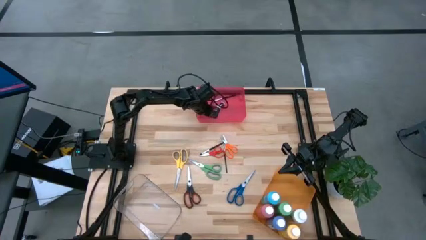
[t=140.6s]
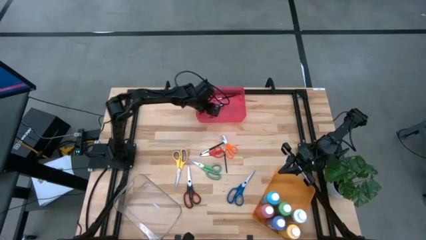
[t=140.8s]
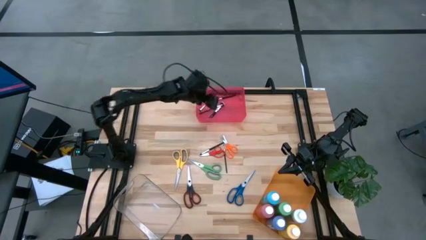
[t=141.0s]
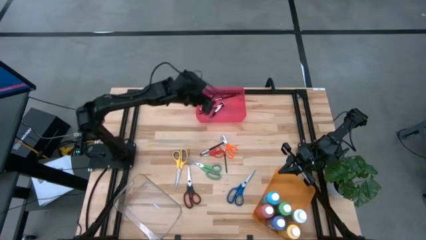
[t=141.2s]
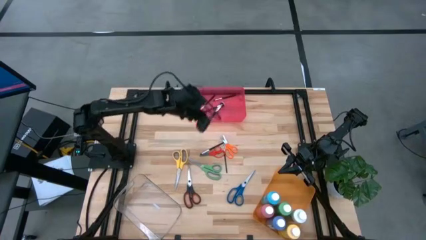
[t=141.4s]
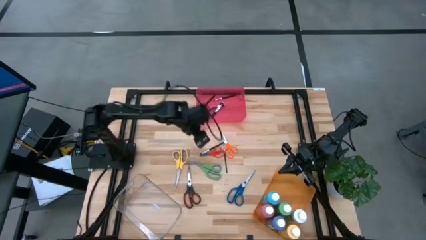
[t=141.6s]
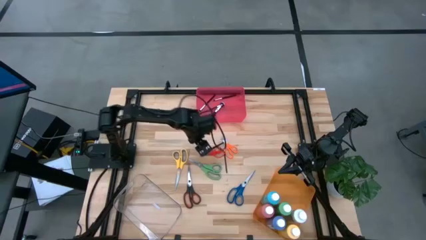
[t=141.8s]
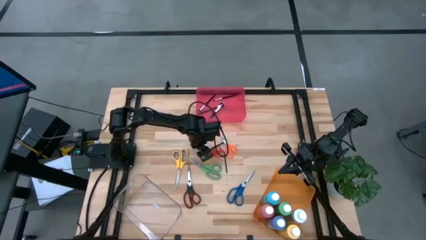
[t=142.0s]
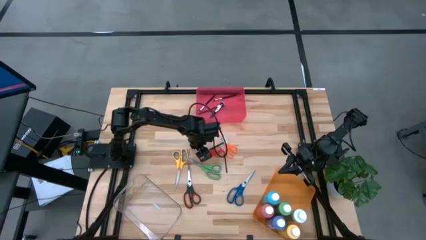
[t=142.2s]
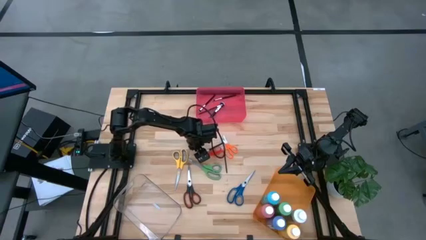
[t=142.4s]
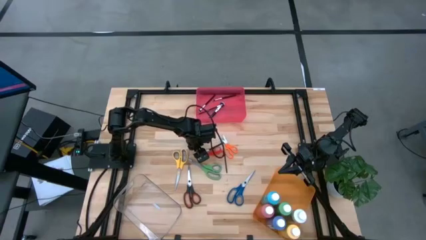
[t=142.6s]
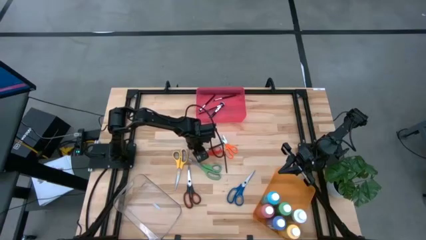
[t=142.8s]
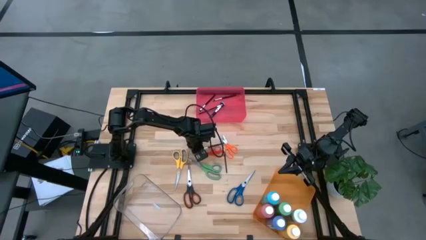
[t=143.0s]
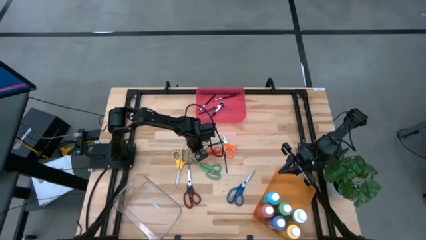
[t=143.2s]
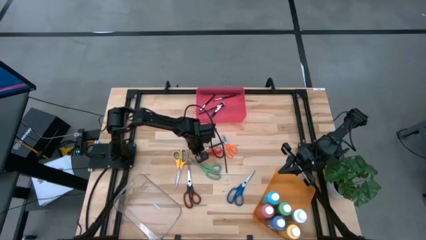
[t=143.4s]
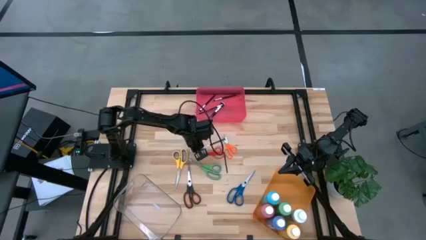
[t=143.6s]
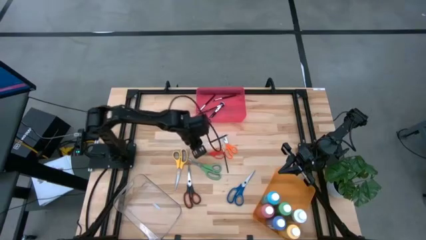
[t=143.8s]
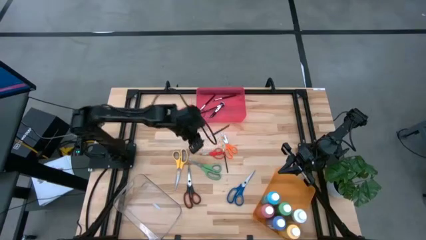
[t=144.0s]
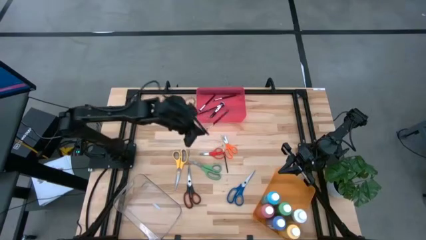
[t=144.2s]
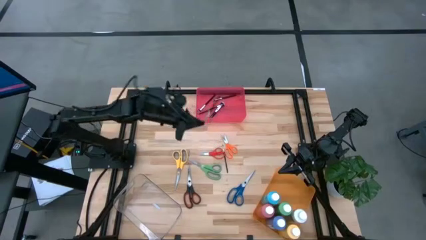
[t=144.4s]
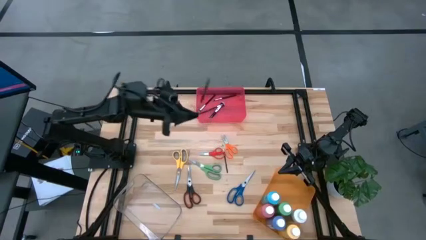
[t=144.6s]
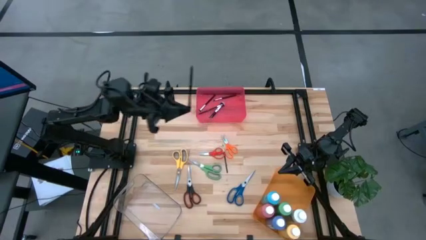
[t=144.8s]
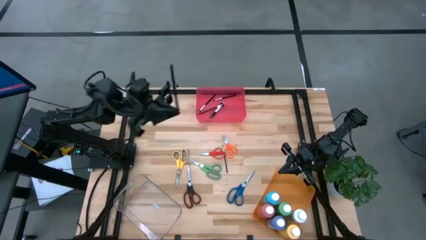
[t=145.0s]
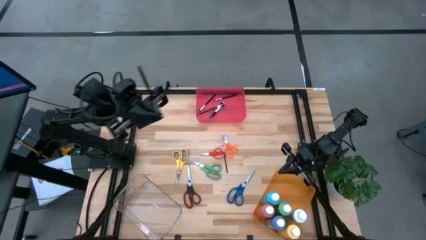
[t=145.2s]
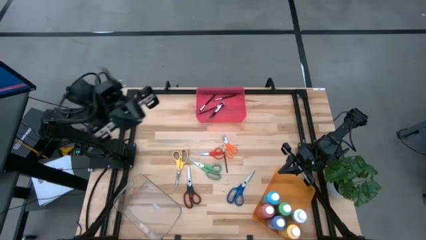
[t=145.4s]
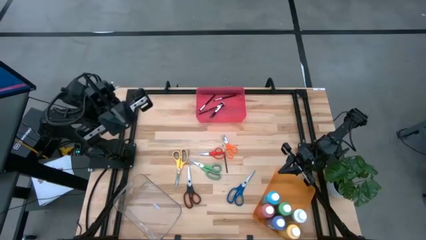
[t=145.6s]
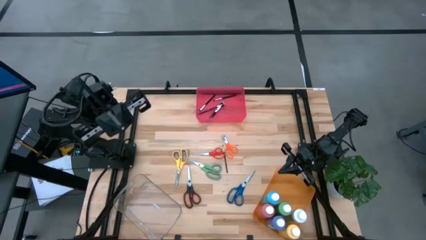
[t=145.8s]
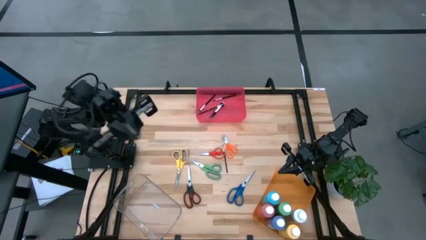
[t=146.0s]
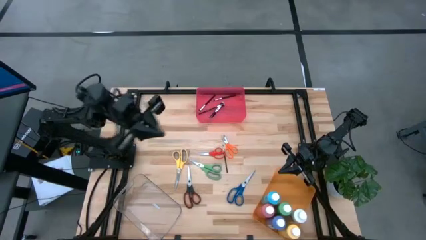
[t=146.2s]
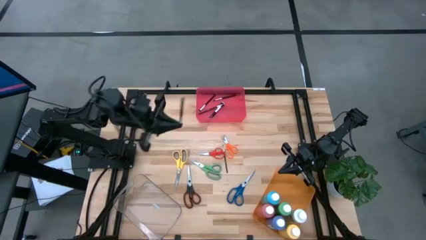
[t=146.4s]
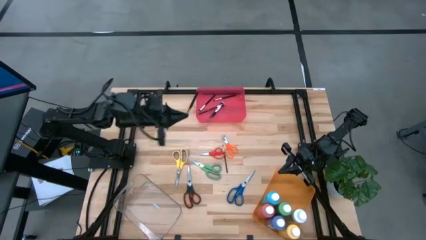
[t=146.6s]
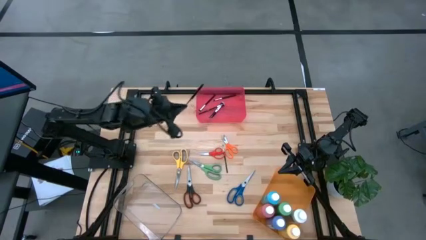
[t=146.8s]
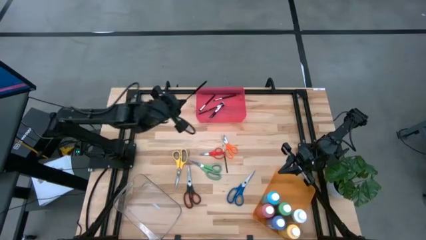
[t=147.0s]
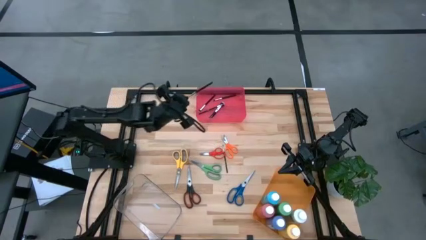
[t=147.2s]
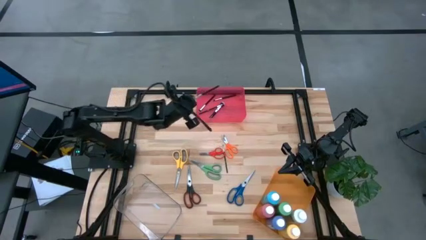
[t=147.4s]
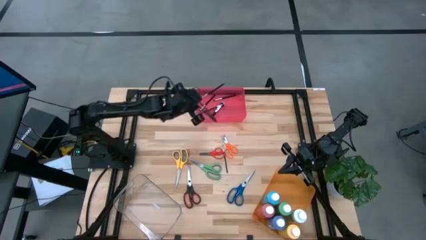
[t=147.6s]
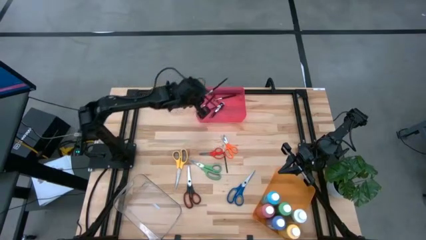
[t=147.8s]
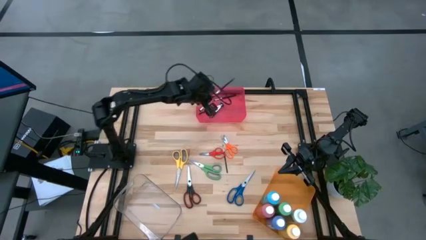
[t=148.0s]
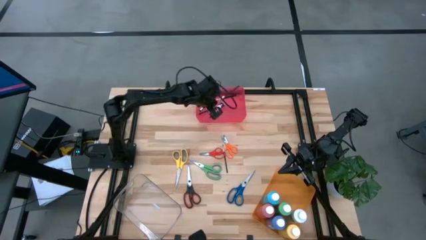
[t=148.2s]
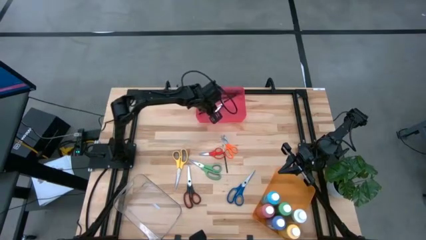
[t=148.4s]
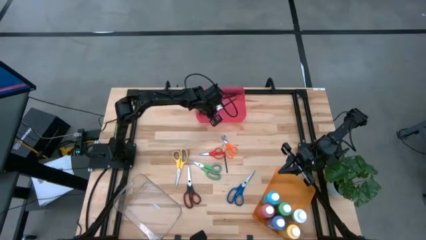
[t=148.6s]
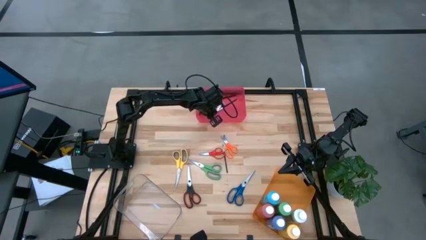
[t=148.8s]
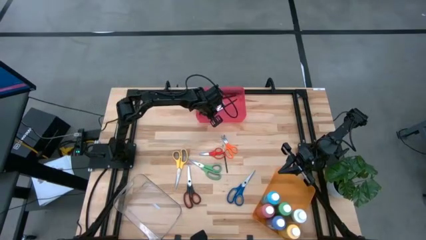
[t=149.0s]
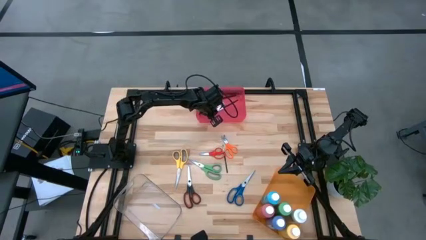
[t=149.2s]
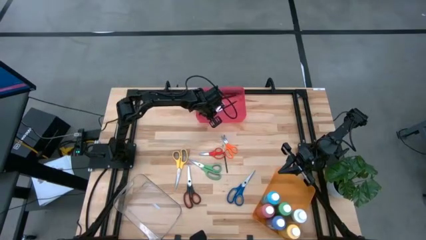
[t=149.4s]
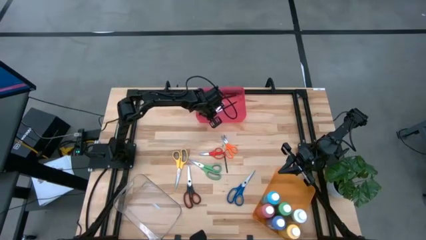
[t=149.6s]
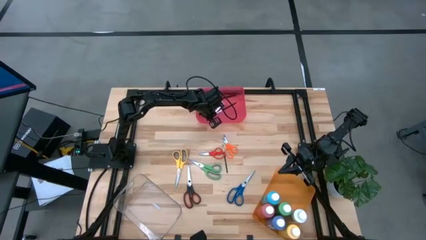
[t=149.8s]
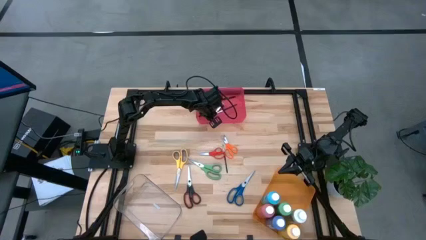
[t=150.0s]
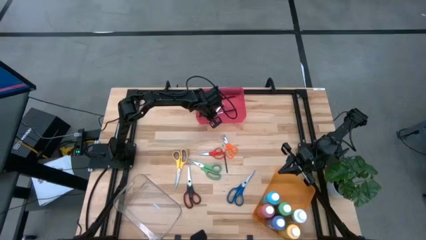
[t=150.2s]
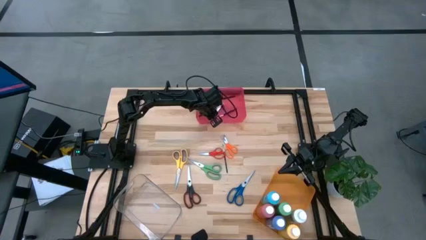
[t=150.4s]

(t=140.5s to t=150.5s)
Task: Pick & Place Paint Supplies
Put the silver brush into the red bin

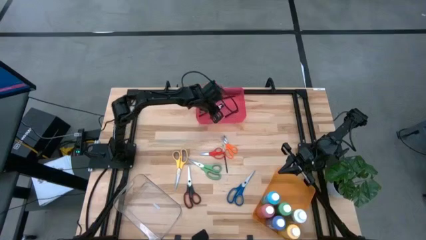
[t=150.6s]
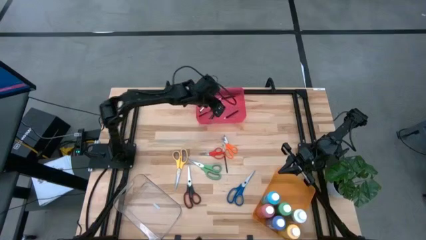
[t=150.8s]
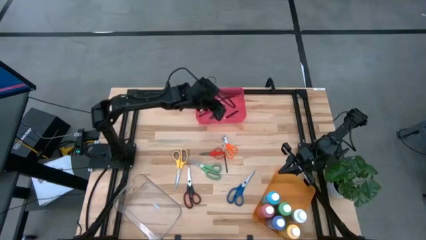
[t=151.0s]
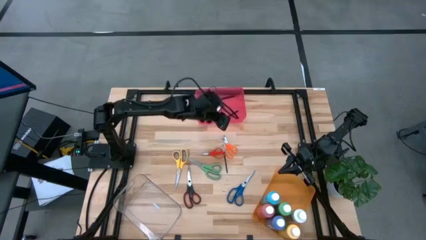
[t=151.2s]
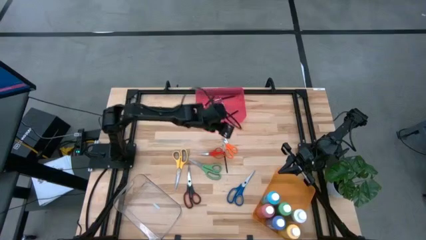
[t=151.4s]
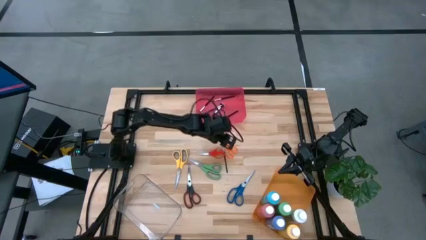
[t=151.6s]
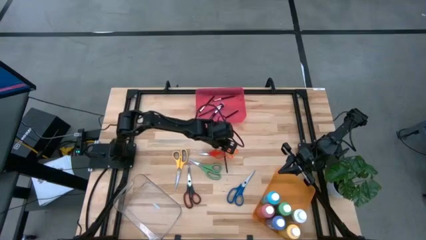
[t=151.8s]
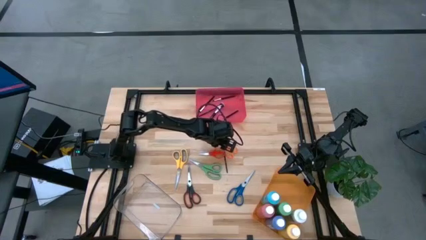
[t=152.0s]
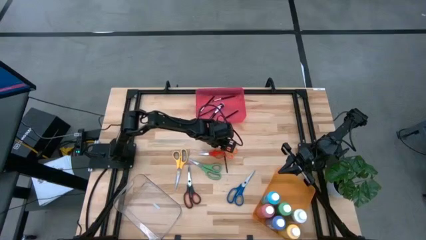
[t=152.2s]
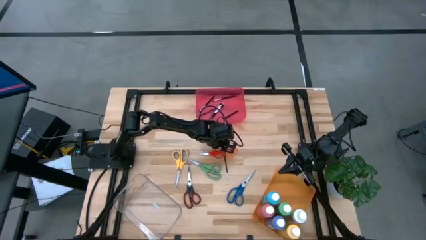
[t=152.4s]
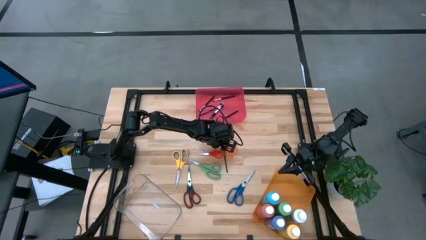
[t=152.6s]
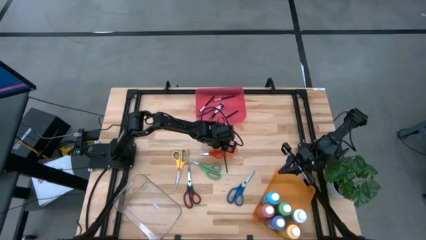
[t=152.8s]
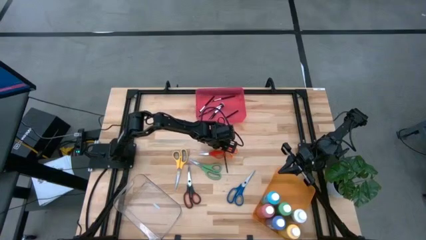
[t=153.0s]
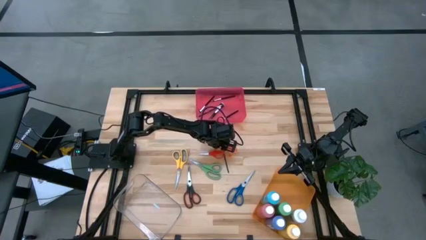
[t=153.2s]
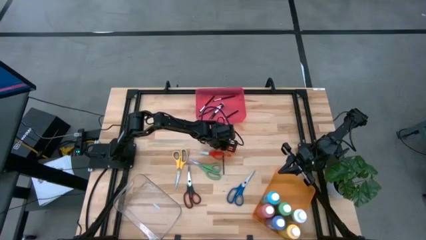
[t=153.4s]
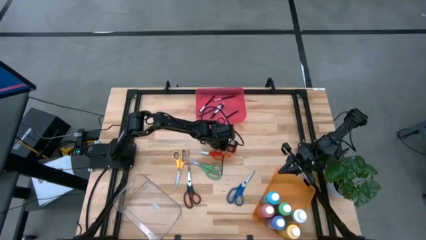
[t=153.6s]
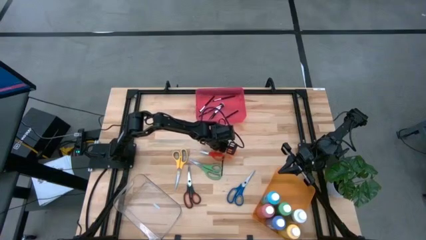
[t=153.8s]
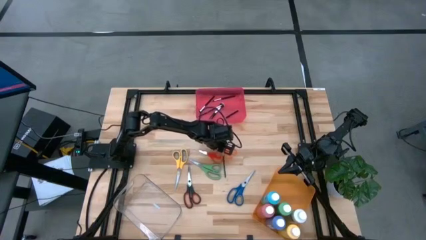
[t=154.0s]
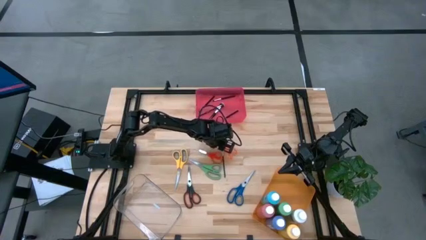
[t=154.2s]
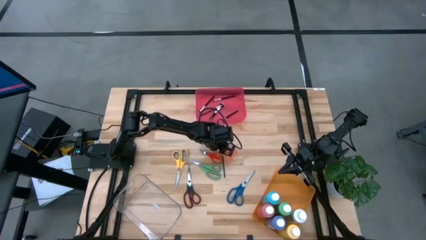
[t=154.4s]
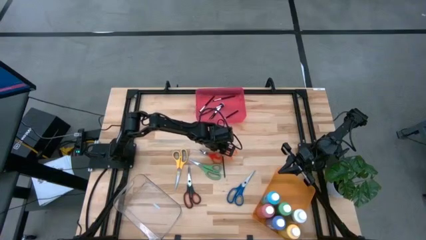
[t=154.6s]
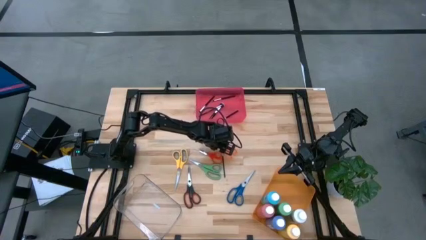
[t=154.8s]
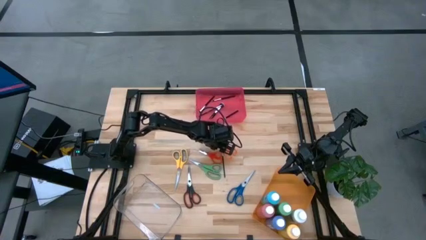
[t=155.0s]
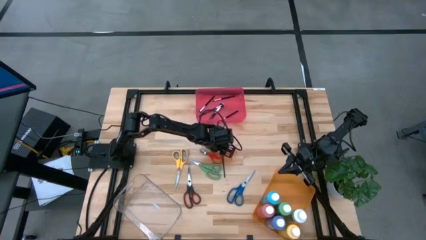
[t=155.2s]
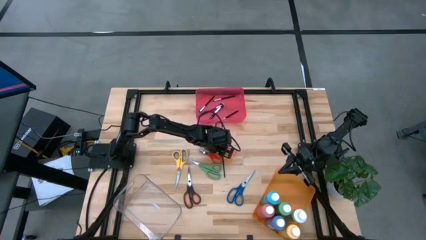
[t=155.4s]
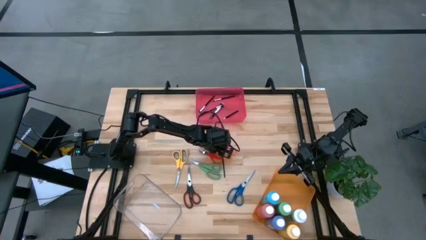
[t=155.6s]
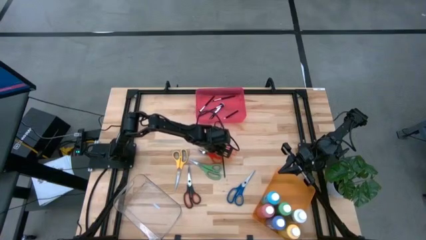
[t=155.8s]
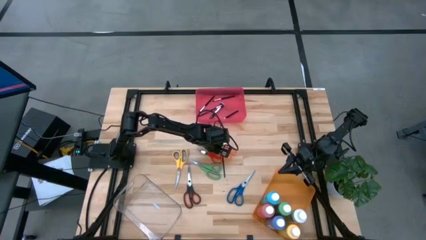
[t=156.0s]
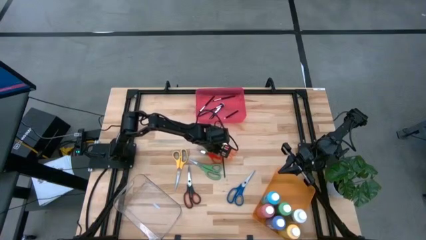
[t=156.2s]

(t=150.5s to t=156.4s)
Put the silver brush into the red bin

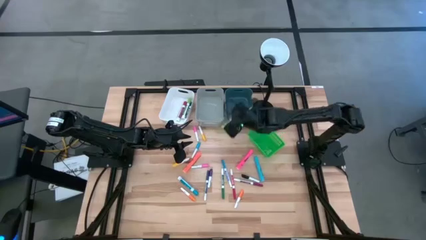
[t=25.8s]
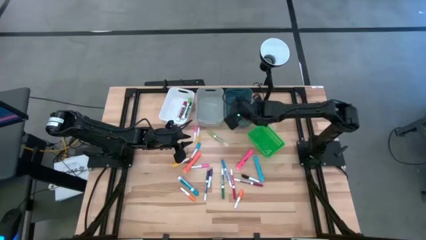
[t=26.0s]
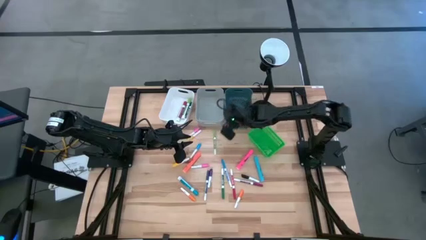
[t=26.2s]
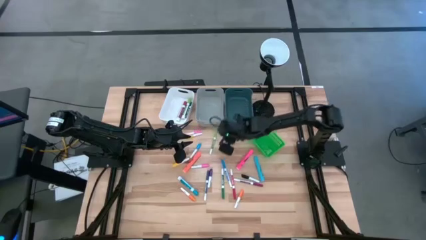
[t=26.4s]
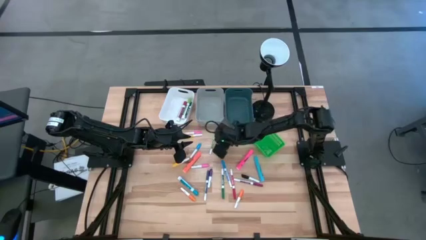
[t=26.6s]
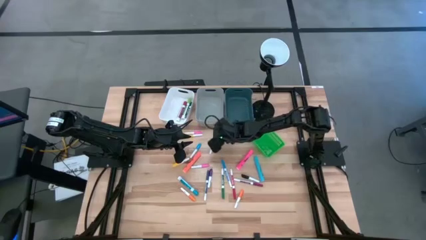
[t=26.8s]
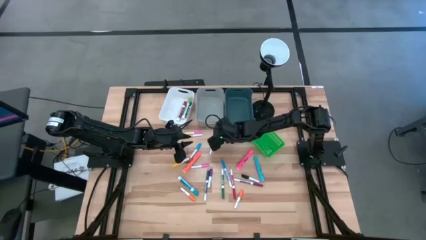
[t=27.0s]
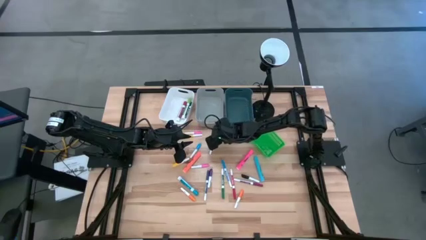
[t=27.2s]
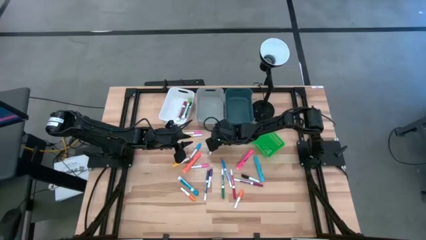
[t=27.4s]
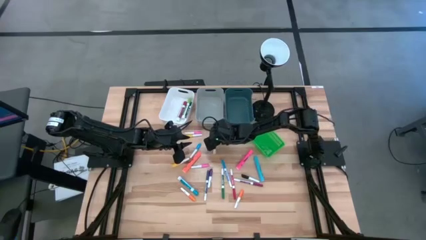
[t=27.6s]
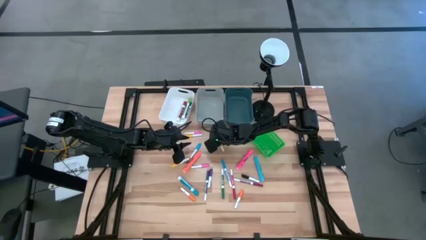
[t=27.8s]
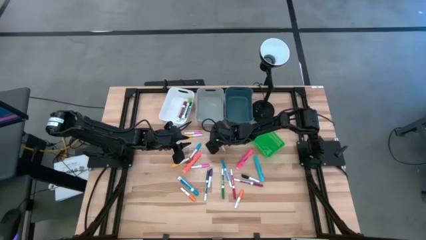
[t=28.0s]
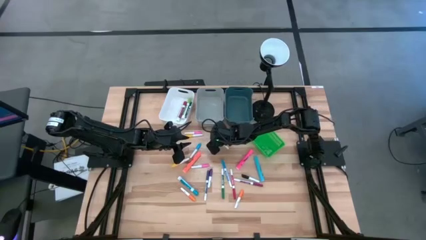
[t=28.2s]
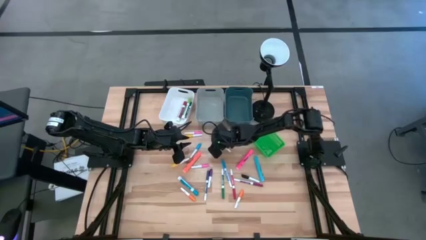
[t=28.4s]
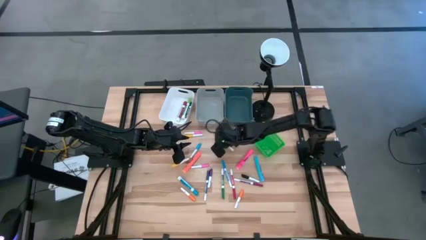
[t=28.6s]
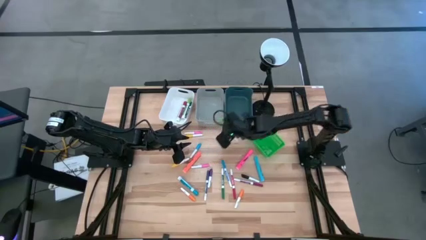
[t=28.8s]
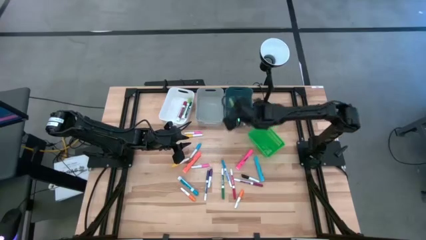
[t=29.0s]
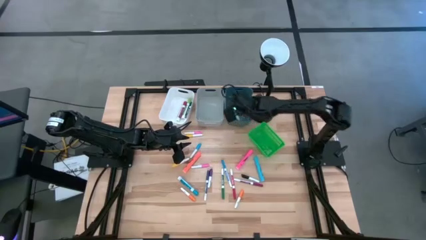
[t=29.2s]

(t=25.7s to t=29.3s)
Task: Pick & Place Markers
Put the light green marker pen into the blue bin
